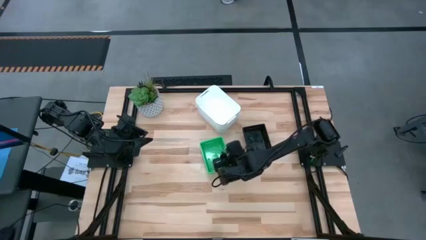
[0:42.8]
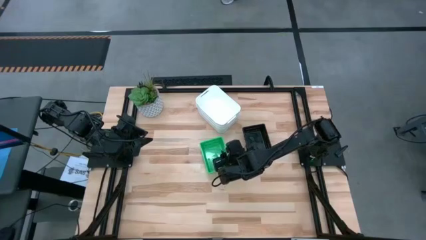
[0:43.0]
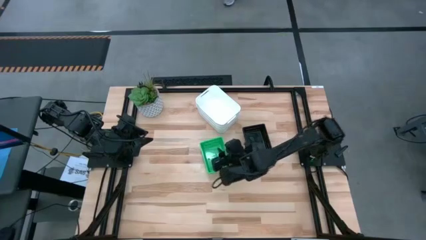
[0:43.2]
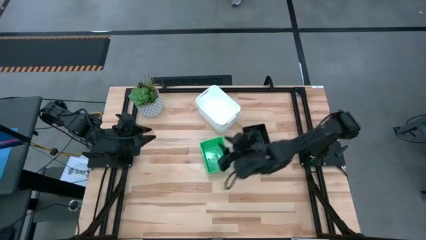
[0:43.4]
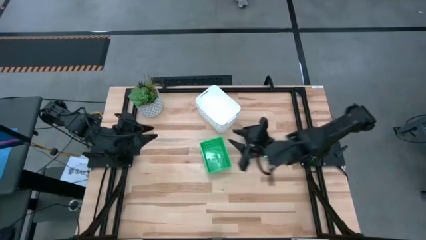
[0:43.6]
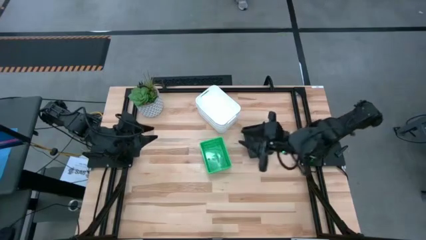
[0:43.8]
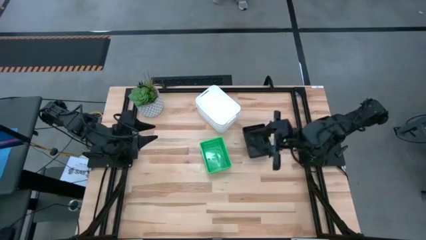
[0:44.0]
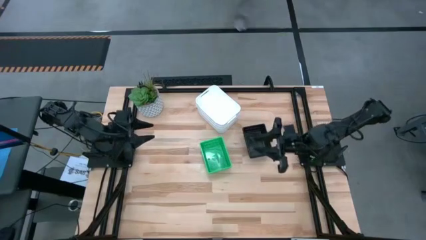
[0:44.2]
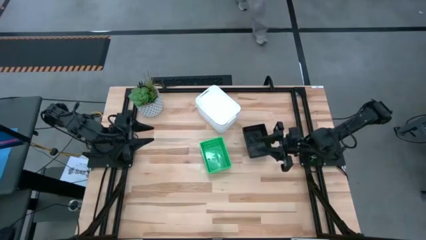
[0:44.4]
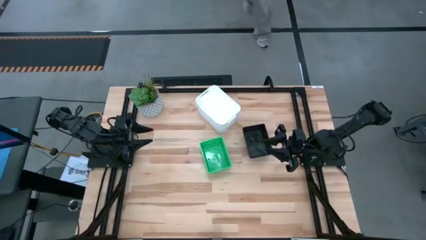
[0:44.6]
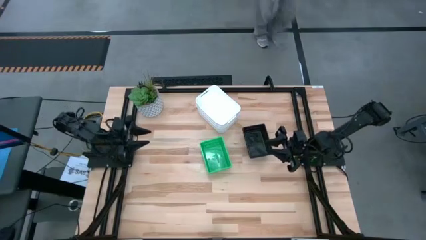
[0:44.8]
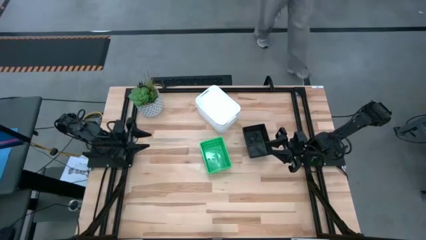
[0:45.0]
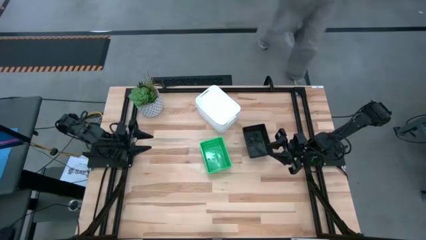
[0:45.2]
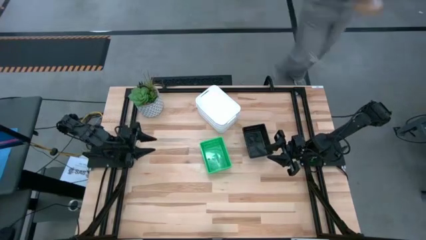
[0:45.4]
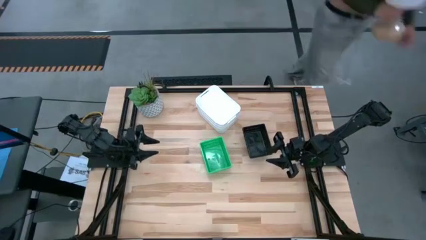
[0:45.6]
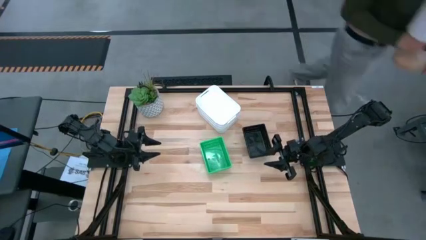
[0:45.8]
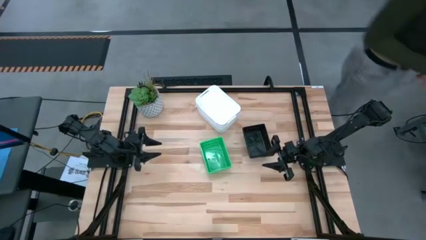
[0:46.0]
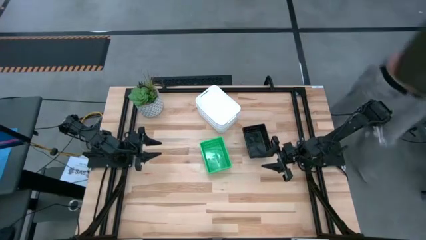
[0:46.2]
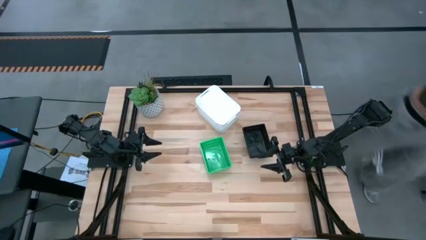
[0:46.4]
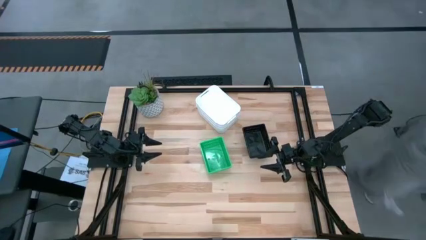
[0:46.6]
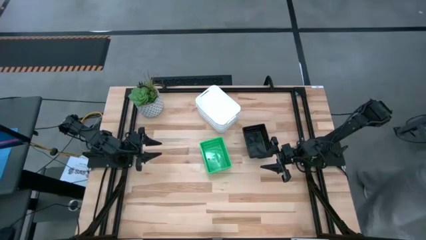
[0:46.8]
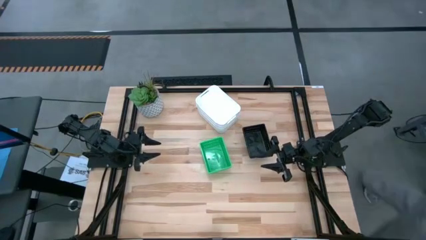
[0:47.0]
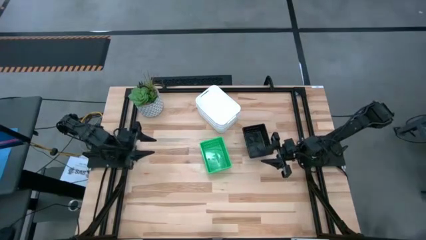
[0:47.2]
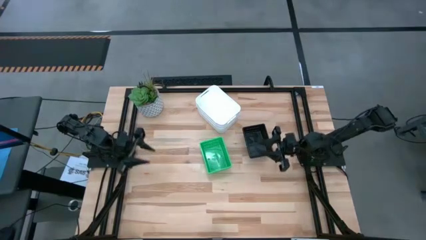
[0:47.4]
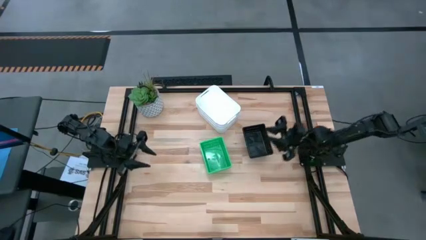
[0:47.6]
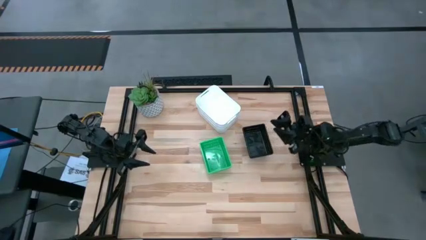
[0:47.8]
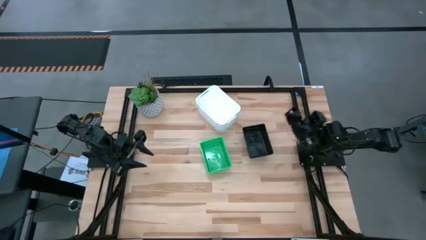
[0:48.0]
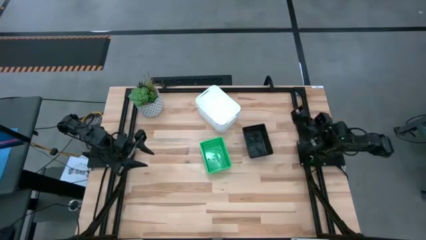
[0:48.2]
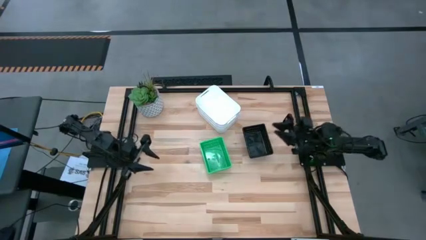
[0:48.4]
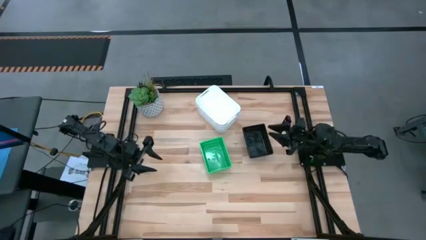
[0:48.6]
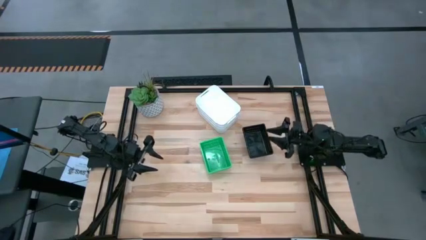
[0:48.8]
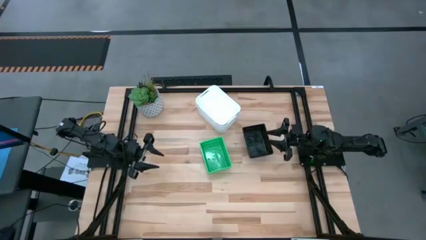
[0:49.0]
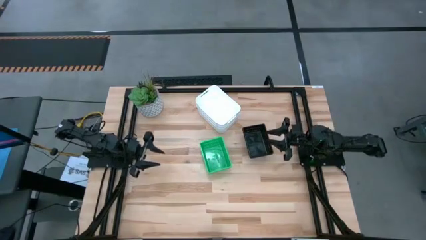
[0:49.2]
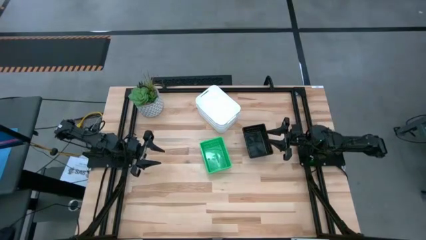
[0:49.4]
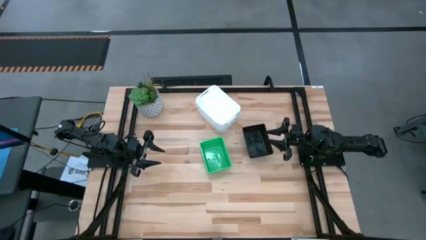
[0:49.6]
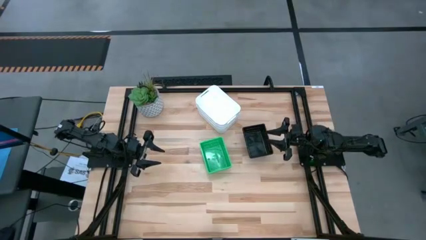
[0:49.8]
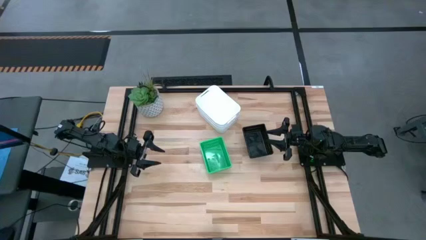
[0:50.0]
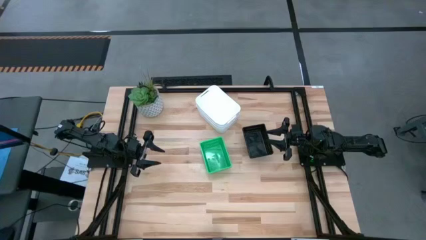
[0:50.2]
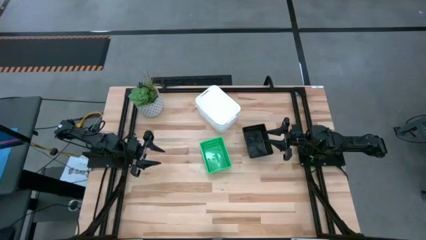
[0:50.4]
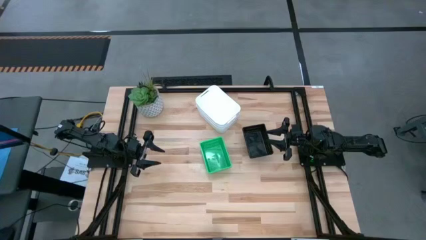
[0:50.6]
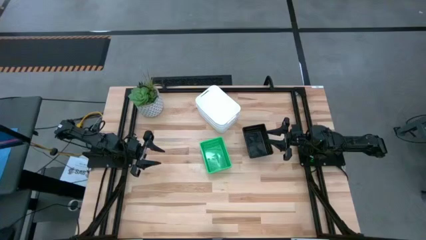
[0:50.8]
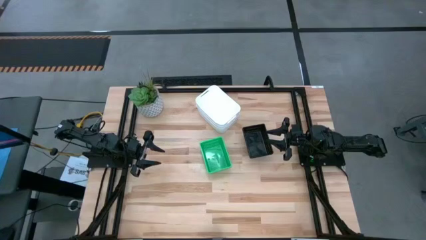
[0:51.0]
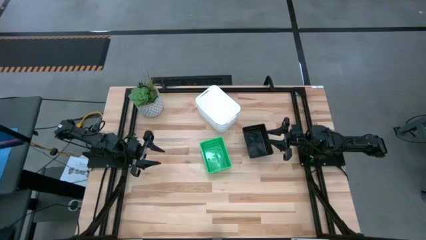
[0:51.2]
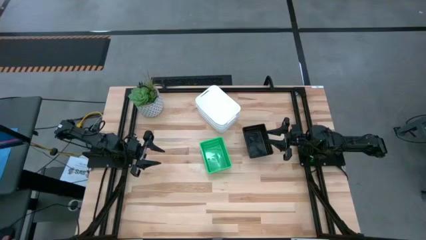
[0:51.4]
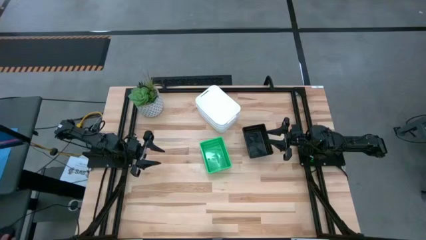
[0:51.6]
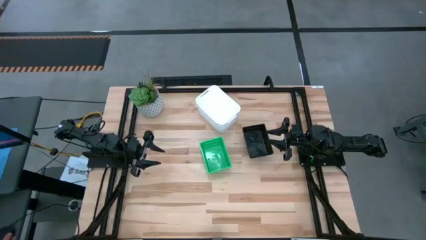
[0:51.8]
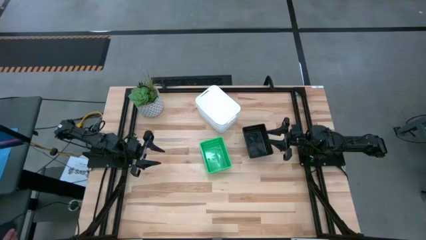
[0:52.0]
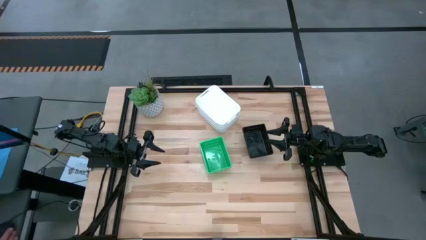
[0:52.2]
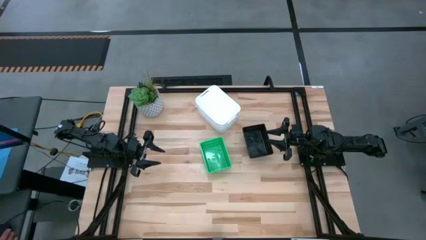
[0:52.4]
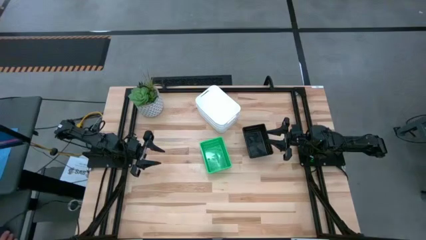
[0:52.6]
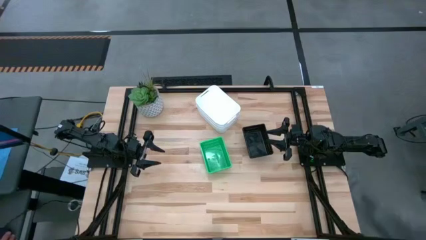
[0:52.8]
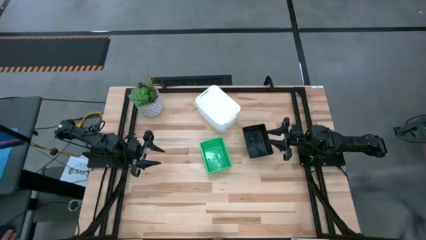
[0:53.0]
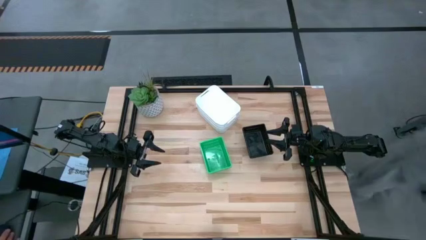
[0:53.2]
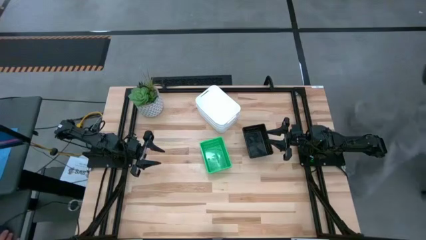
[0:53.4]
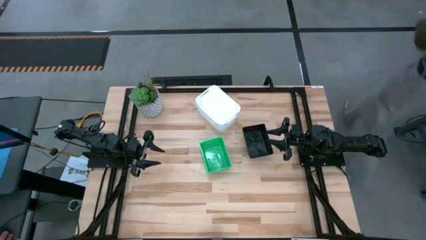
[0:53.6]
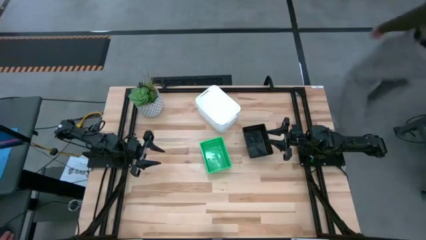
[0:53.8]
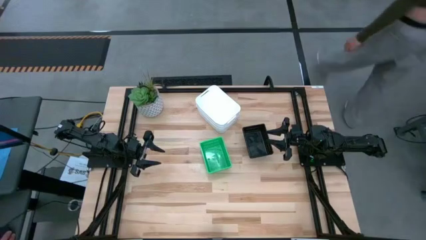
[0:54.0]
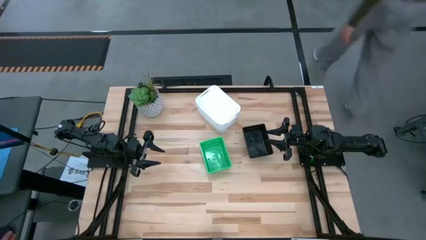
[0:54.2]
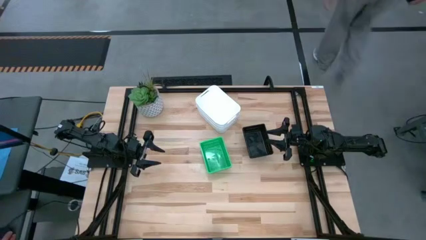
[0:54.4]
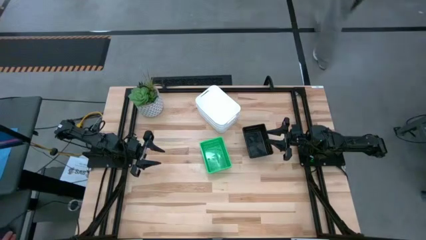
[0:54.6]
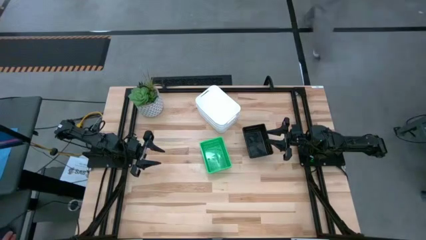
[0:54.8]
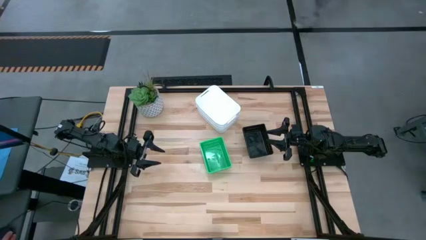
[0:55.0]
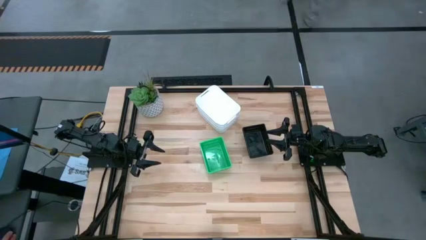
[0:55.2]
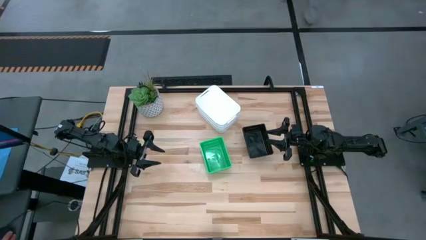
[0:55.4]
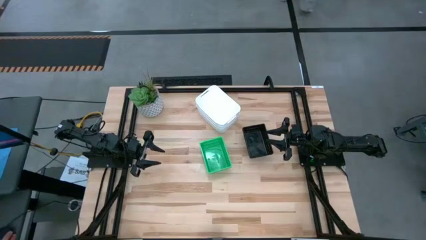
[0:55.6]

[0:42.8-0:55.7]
Return to Home Position

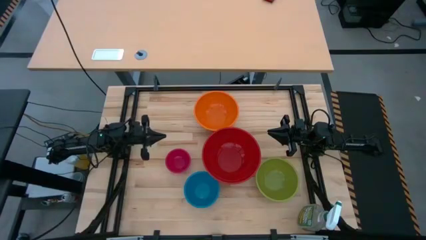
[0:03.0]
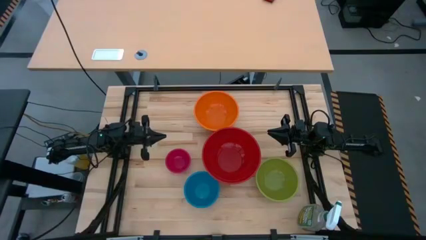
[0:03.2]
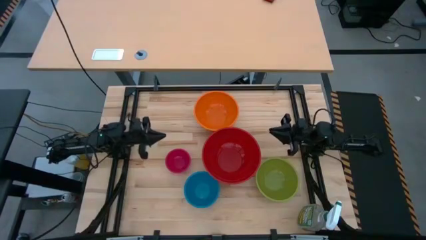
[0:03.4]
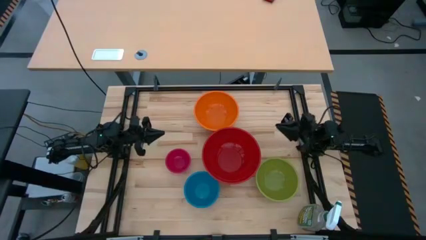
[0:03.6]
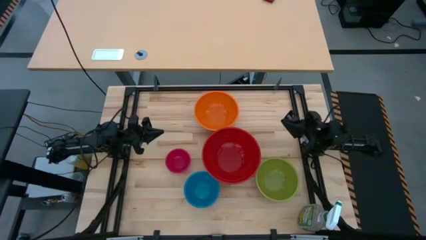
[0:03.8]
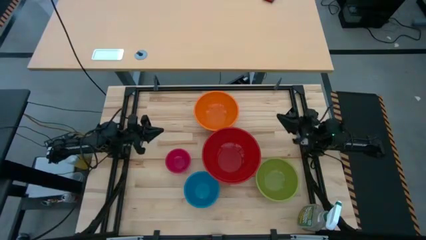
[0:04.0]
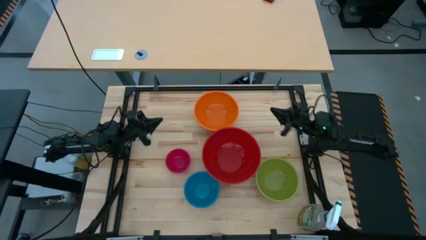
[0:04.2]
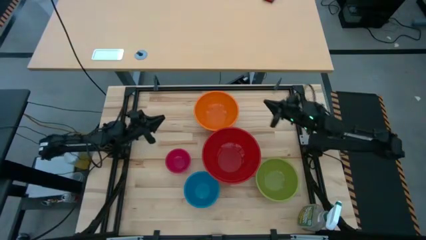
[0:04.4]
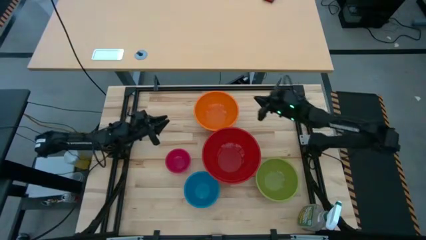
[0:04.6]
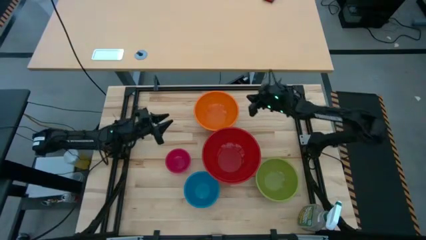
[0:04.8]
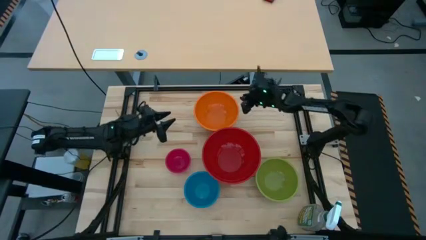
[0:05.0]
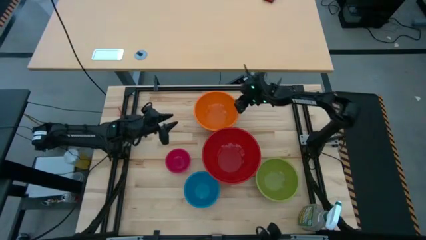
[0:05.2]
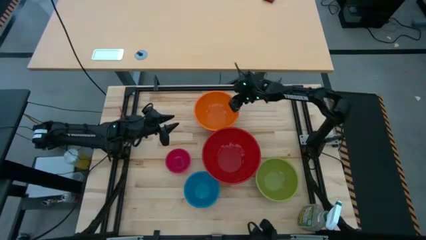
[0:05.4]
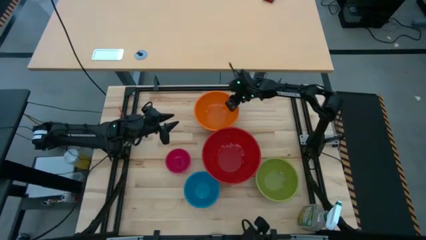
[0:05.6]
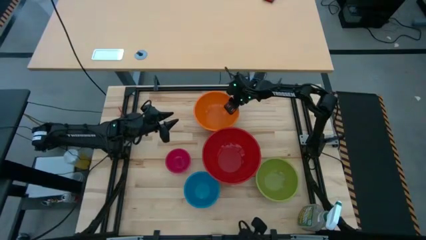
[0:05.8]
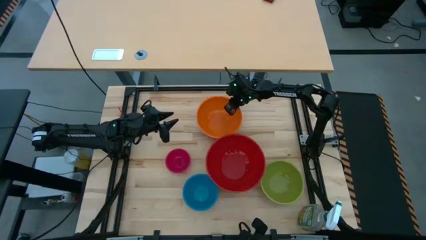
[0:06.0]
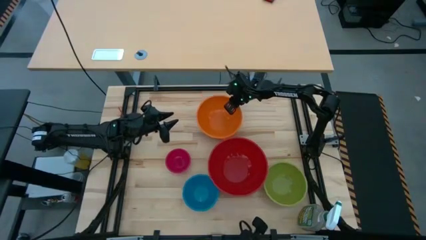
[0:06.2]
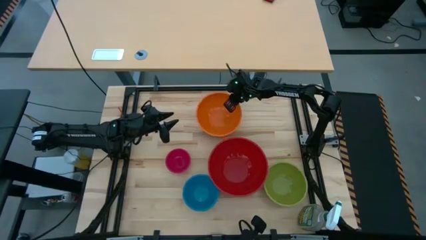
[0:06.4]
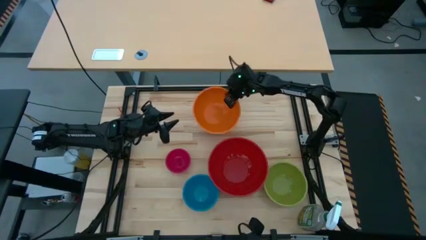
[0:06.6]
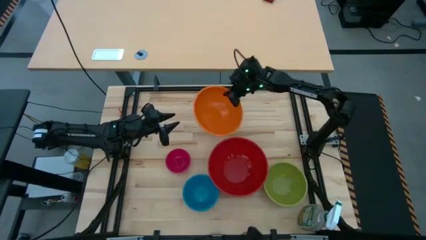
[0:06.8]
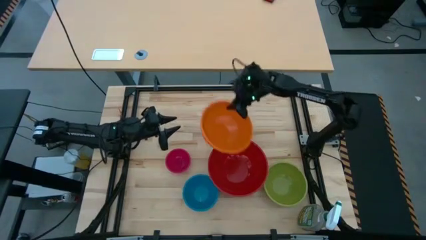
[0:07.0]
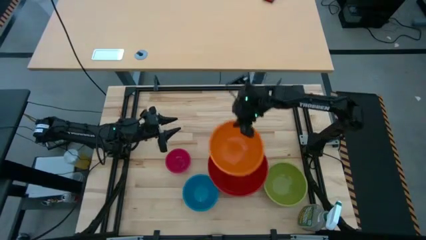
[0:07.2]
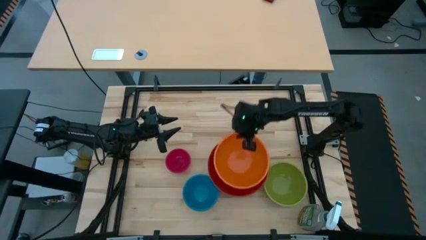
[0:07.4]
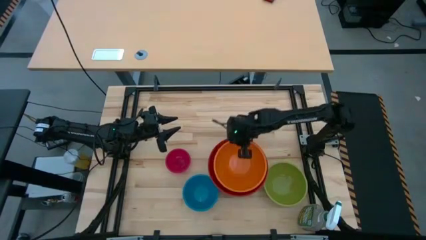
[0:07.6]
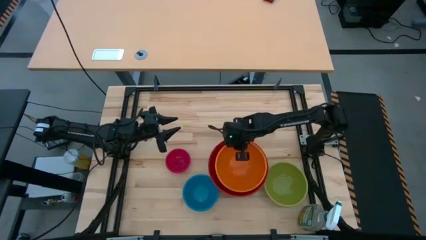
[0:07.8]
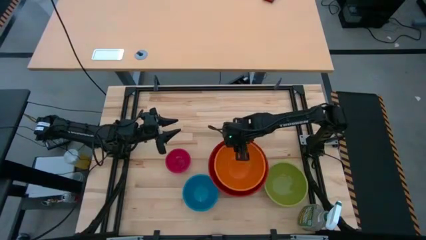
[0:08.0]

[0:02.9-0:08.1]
Stack the orange bowl on top of the large red bowl
